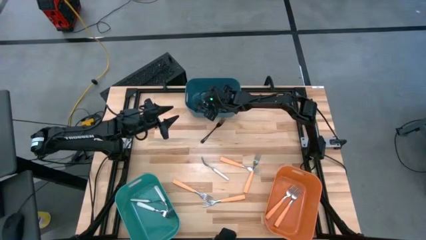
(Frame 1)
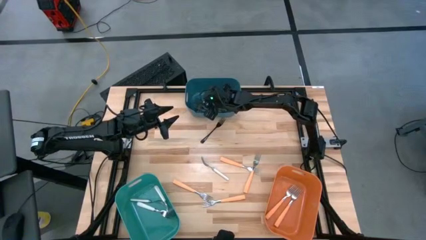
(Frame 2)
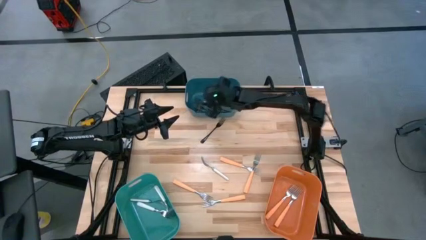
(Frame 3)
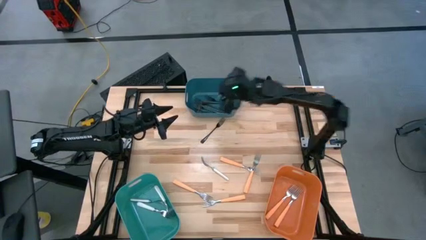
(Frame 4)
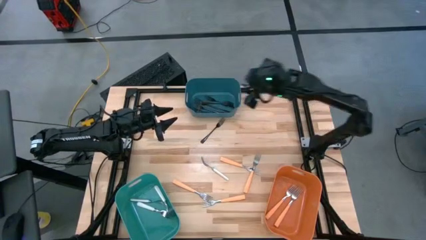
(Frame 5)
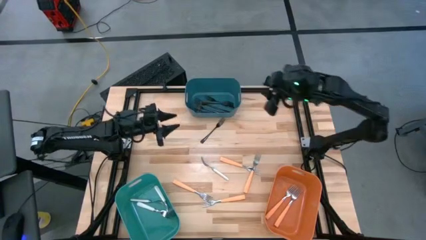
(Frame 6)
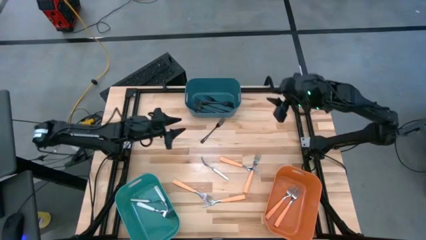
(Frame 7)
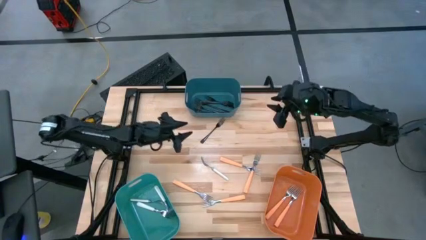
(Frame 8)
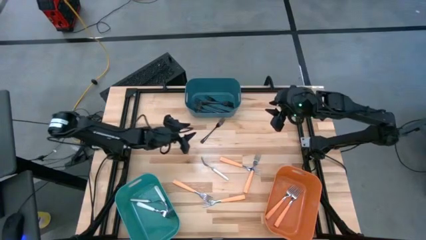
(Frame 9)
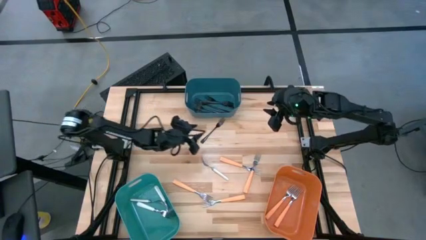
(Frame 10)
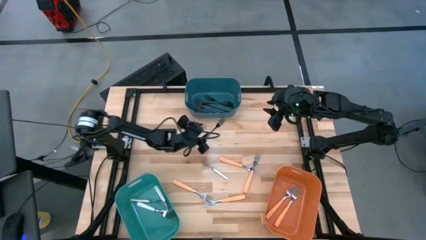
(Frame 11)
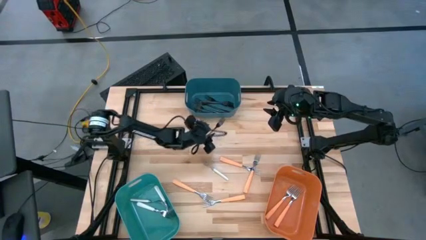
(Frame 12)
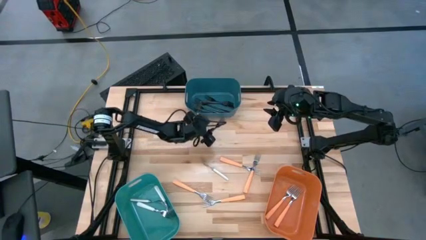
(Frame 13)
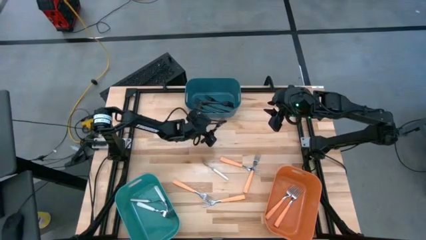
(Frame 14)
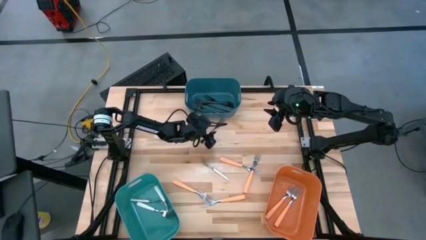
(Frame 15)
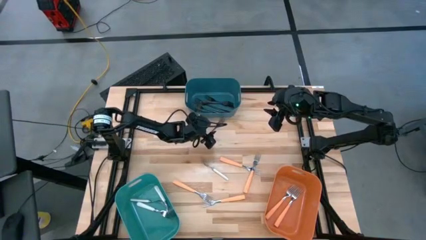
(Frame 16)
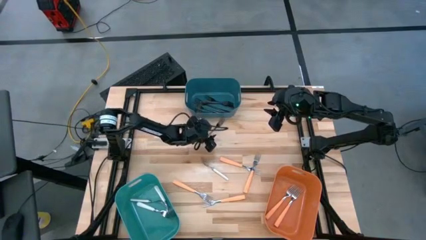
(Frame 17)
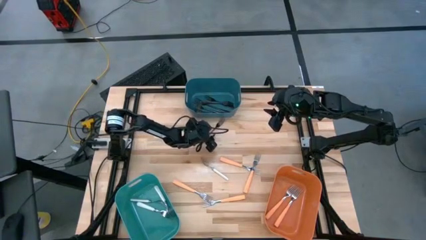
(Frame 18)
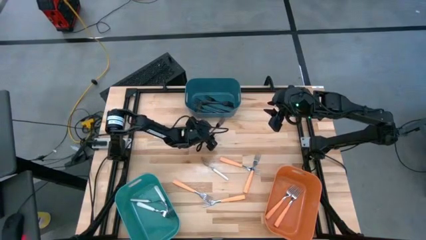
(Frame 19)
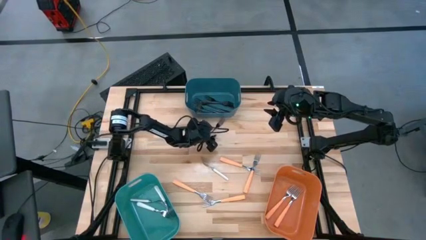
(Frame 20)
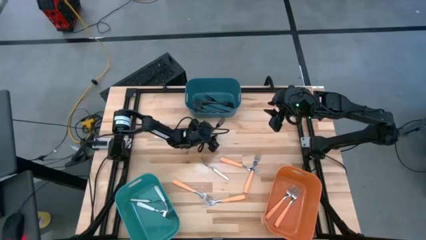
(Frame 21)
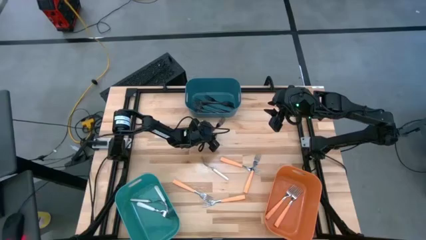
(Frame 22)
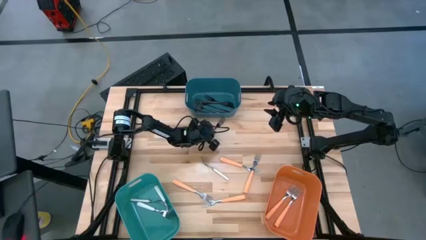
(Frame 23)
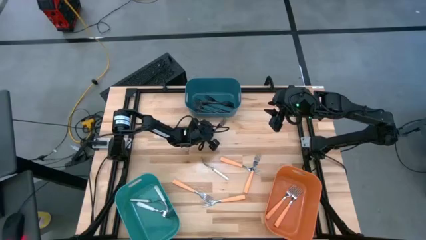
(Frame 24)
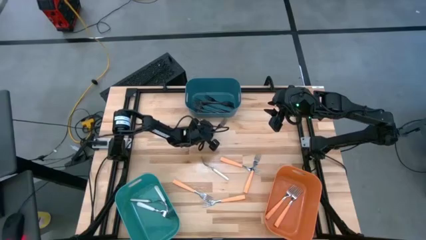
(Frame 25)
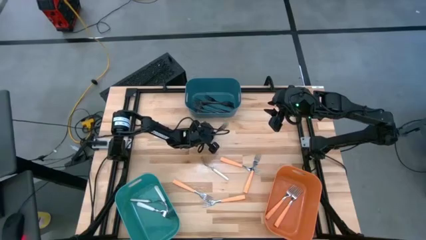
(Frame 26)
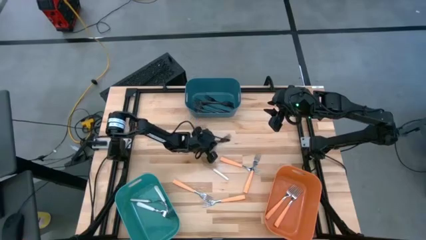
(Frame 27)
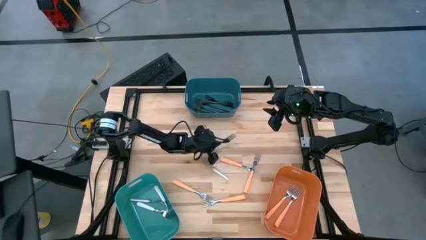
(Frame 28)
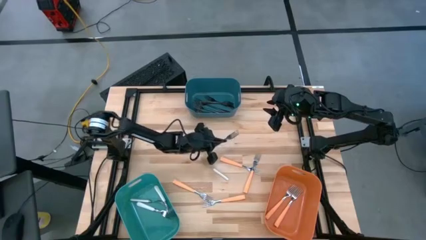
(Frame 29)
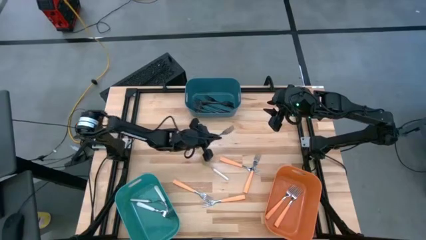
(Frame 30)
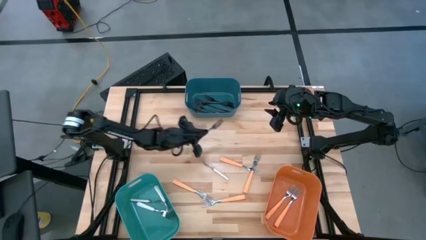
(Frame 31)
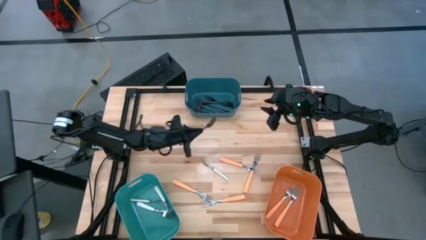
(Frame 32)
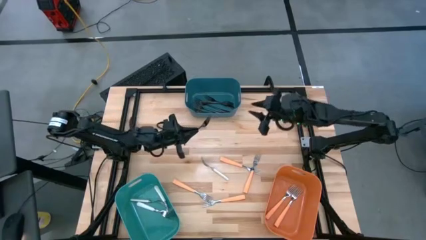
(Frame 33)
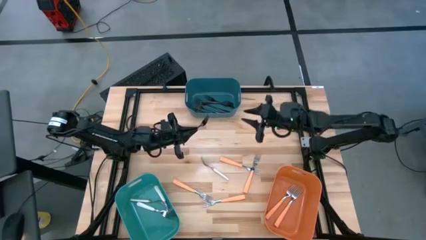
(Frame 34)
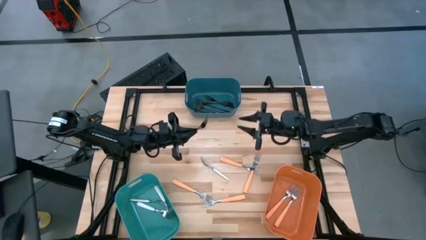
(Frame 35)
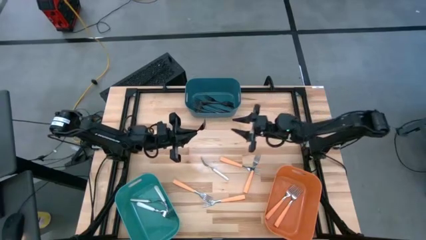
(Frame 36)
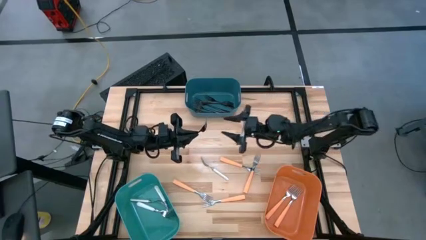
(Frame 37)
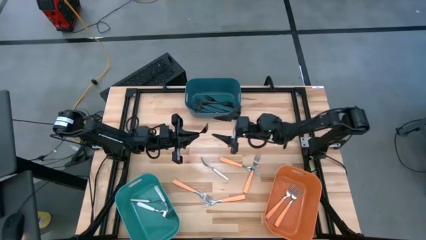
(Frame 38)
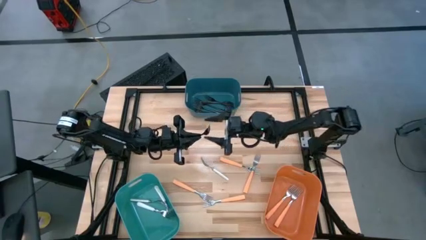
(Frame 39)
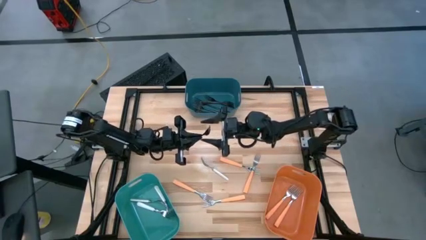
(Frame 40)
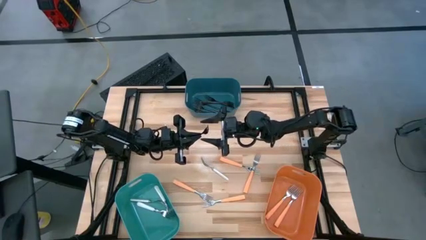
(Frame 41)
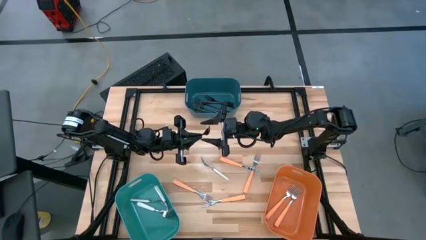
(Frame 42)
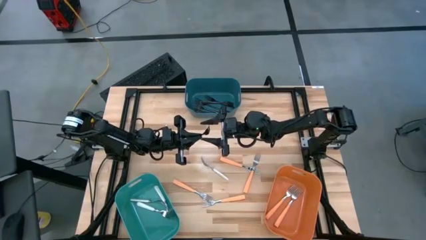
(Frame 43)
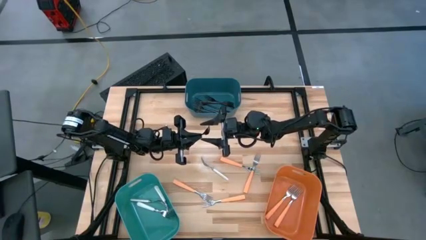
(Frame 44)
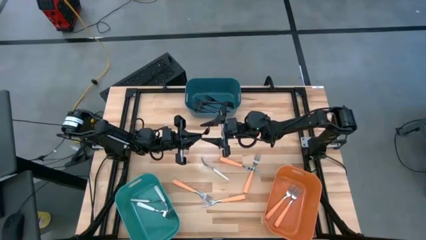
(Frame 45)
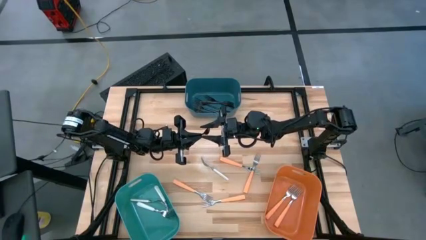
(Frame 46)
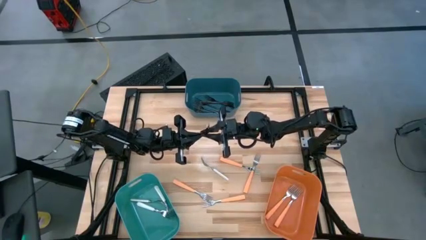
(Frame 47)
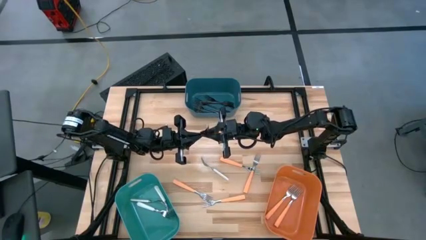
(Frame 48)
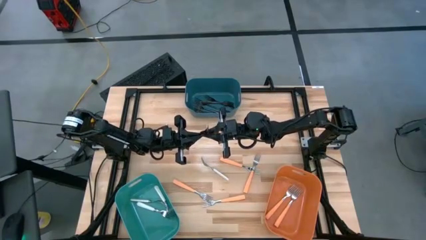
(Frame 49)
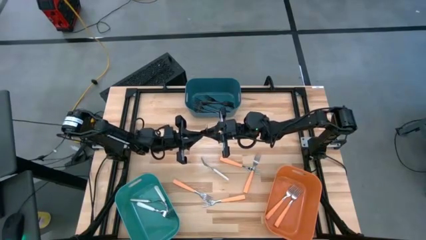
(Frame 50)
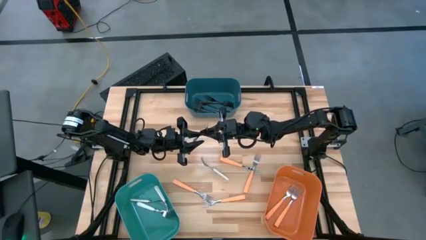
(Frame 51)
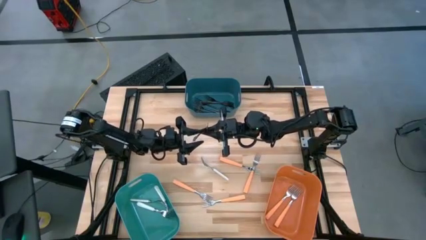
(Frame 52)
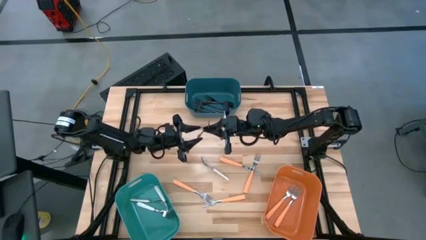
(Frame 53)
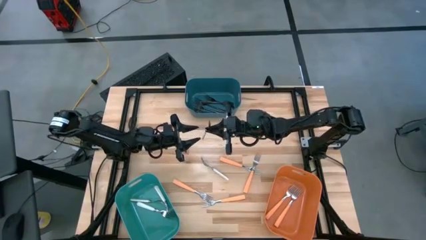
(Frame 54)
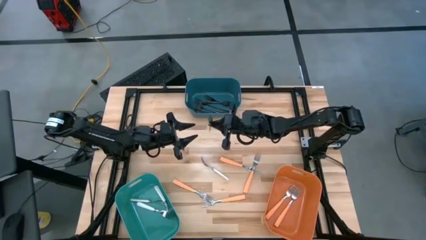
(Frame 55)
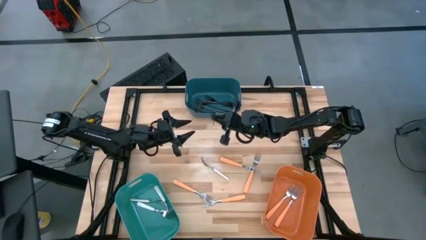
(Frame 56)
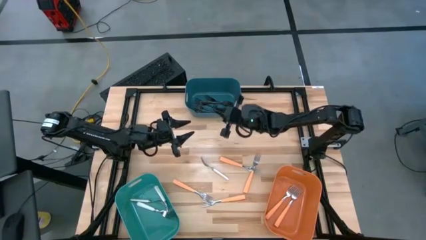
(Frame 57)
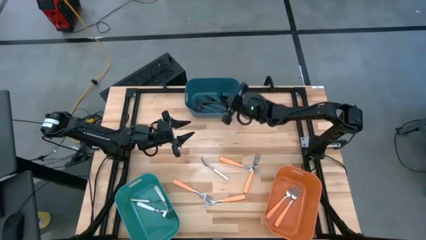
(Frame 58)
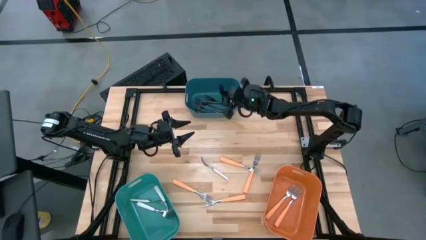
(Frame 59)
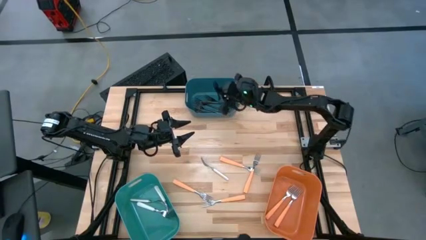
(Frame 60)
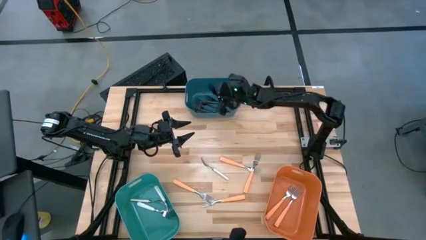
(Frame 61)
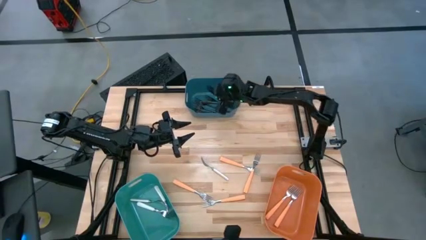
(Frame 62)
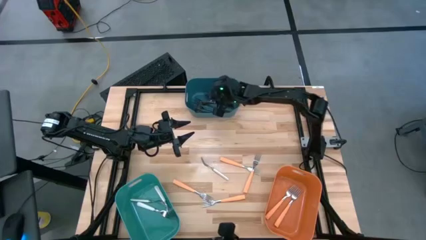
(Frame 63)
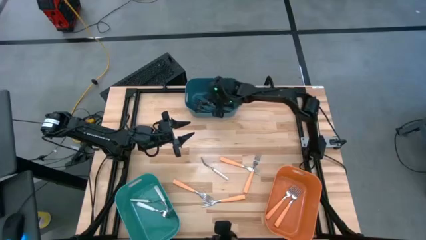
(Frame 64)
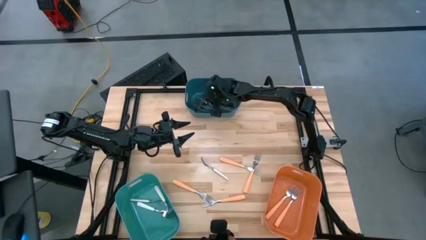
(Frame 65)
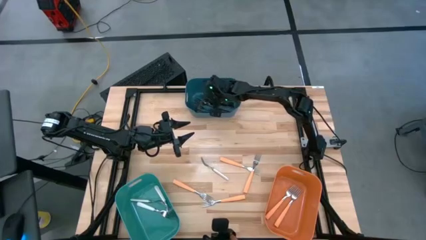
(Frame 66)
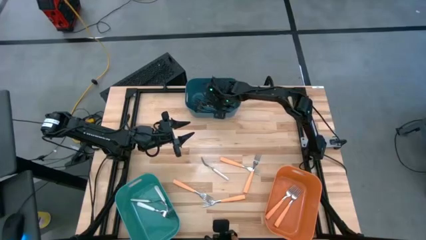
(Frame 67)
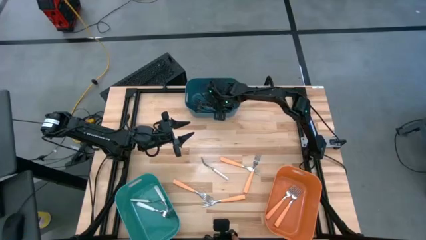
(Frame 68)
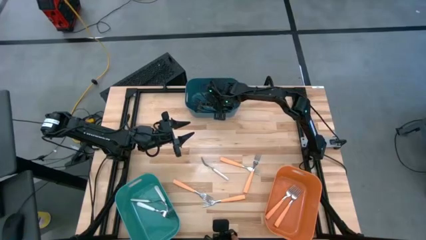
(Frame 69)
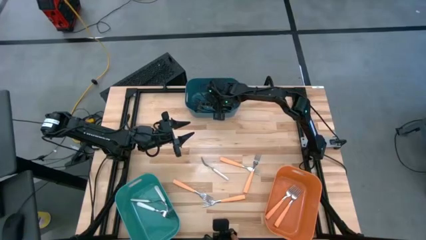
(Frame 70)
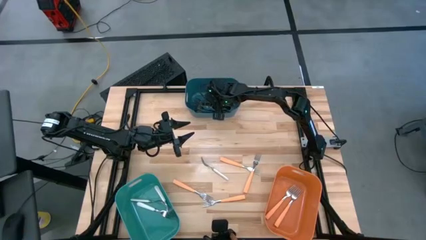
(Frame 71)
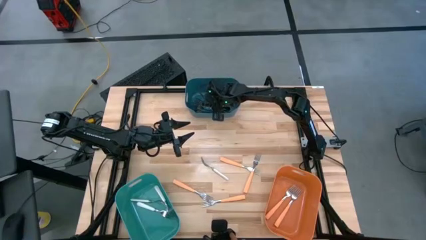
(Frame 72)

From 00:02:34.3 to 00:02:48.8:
Task: Sort silverware by color (type)
Put the black fork into the blue bin
